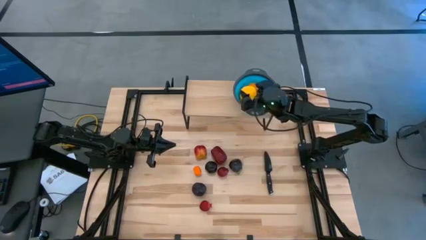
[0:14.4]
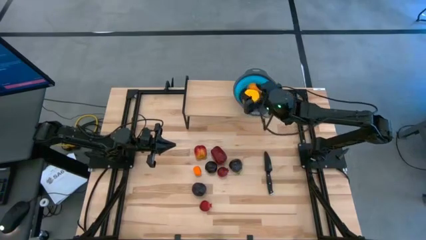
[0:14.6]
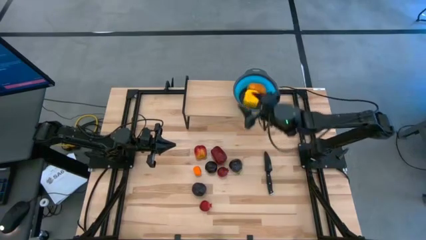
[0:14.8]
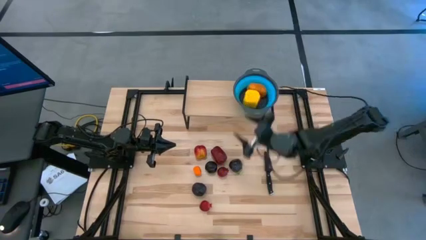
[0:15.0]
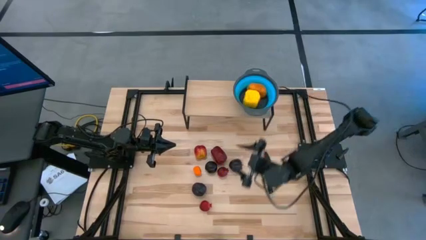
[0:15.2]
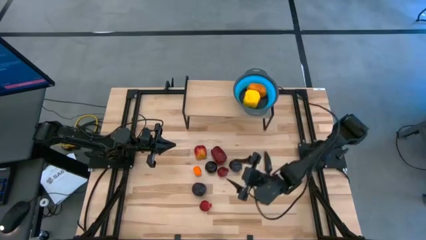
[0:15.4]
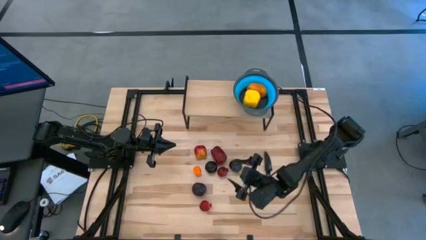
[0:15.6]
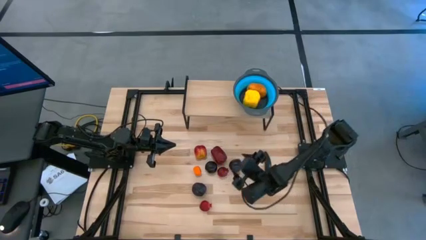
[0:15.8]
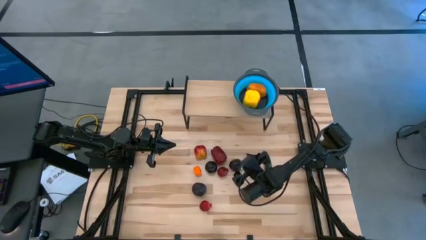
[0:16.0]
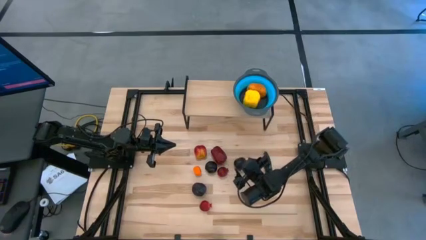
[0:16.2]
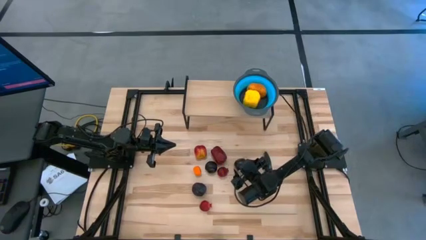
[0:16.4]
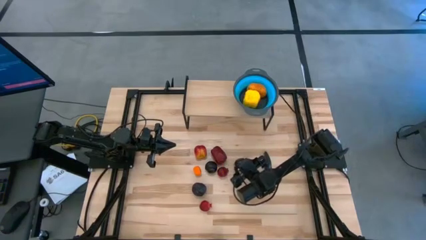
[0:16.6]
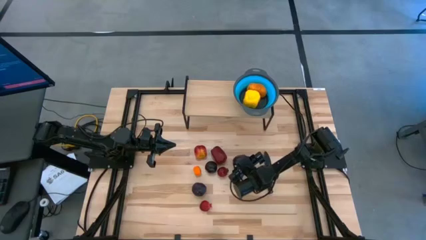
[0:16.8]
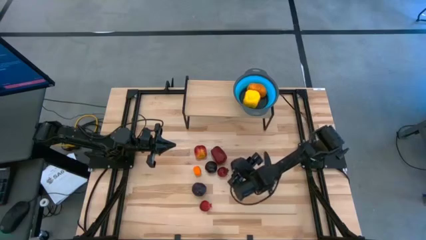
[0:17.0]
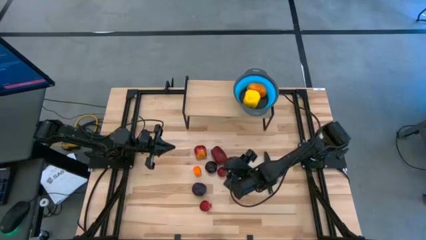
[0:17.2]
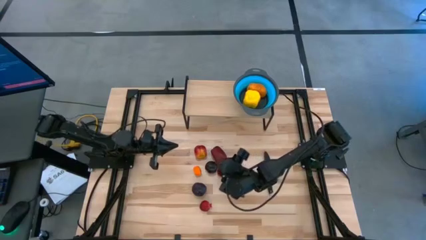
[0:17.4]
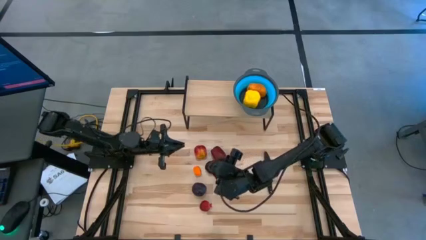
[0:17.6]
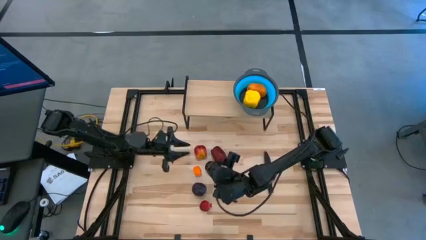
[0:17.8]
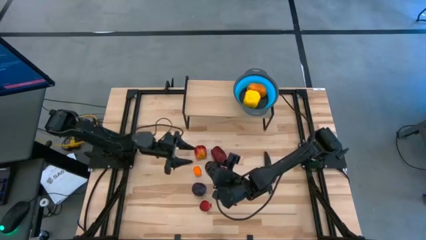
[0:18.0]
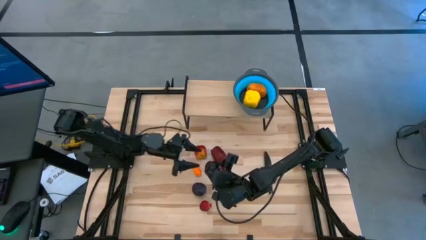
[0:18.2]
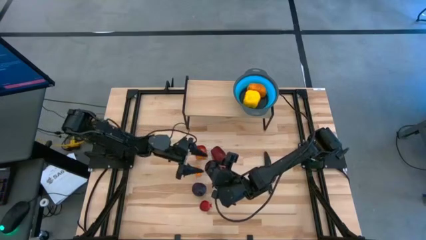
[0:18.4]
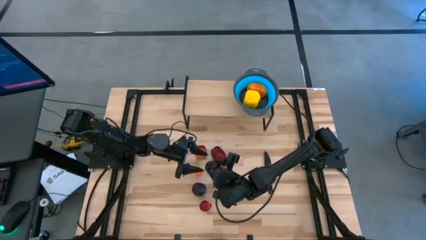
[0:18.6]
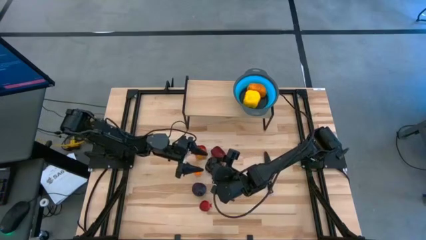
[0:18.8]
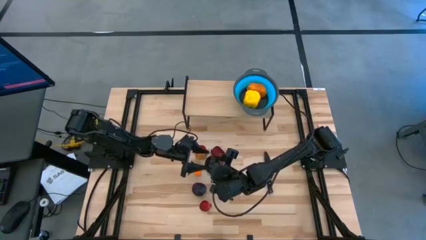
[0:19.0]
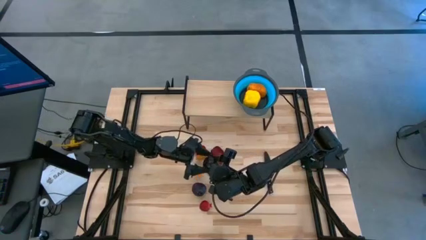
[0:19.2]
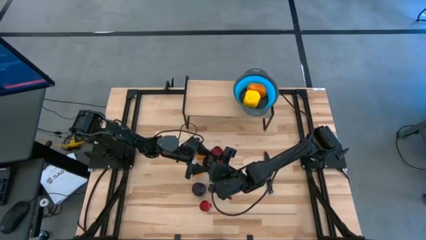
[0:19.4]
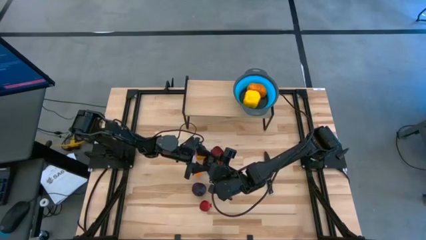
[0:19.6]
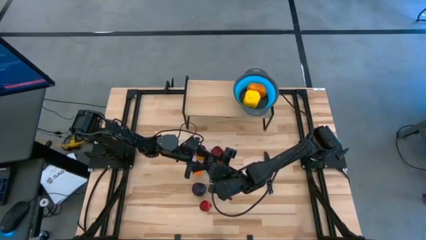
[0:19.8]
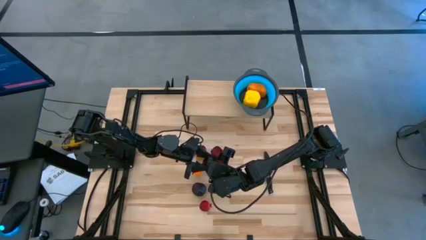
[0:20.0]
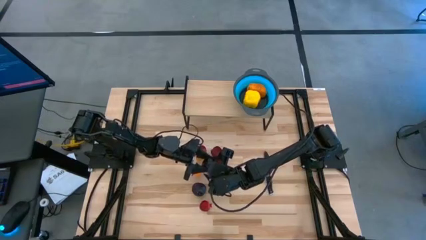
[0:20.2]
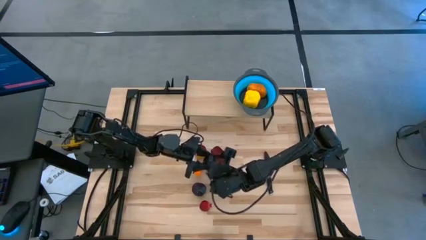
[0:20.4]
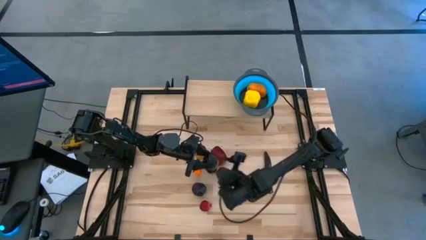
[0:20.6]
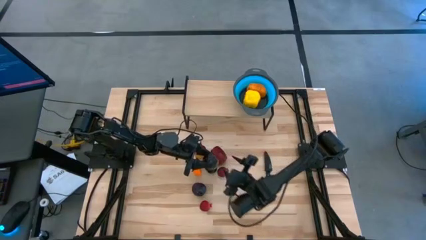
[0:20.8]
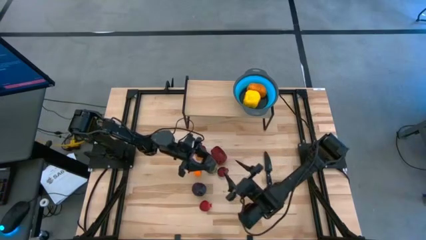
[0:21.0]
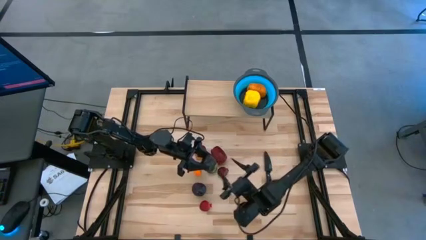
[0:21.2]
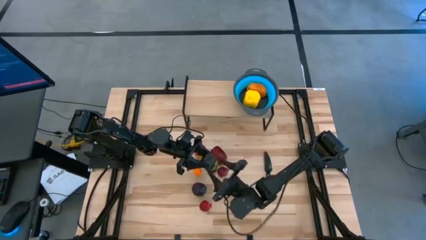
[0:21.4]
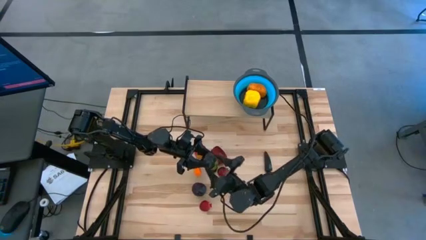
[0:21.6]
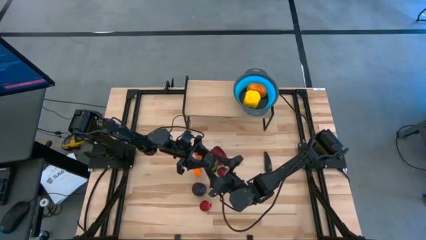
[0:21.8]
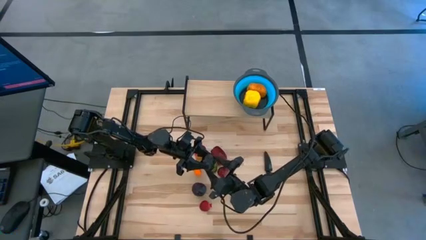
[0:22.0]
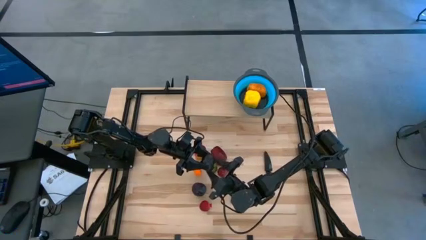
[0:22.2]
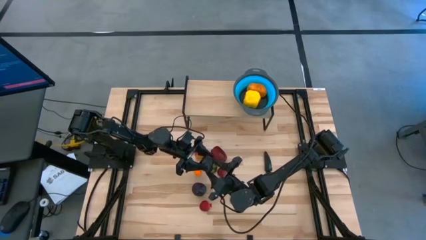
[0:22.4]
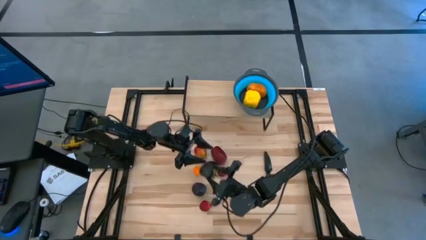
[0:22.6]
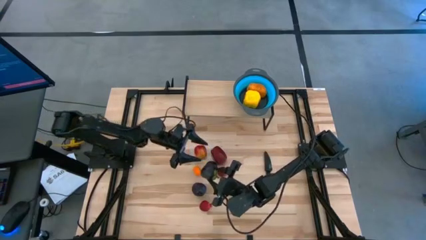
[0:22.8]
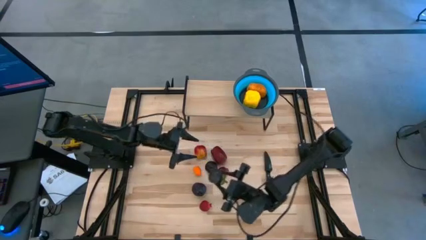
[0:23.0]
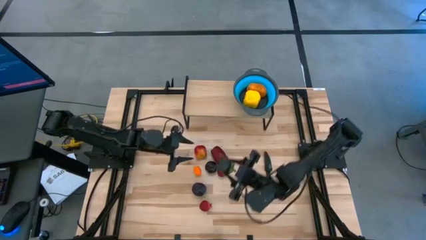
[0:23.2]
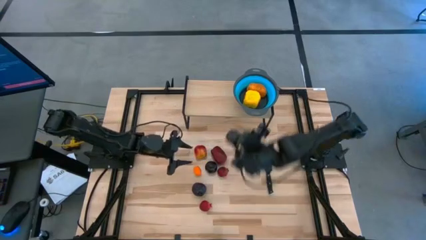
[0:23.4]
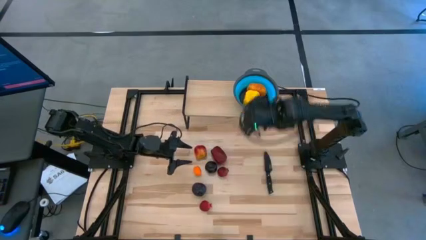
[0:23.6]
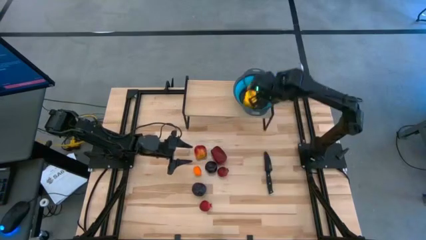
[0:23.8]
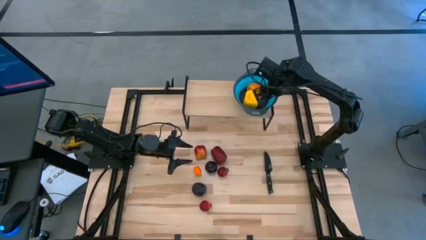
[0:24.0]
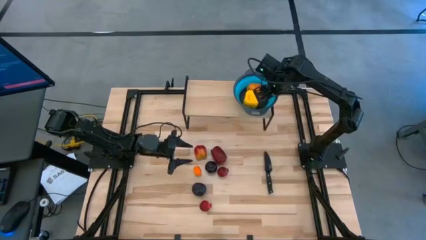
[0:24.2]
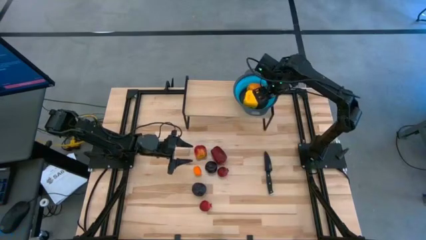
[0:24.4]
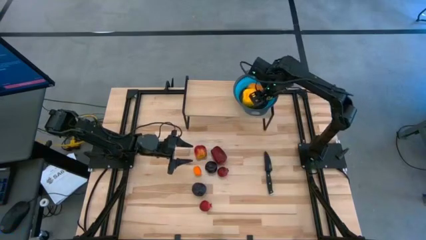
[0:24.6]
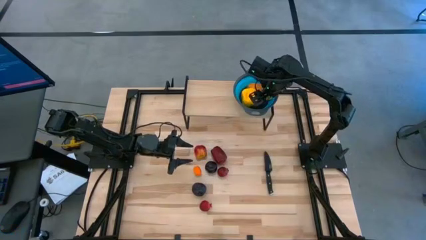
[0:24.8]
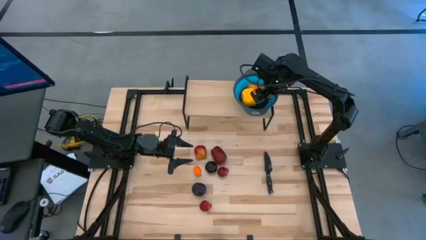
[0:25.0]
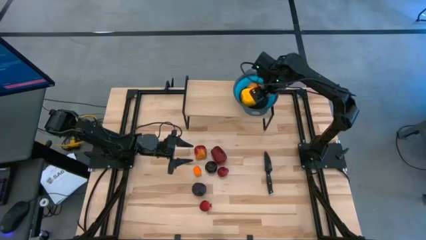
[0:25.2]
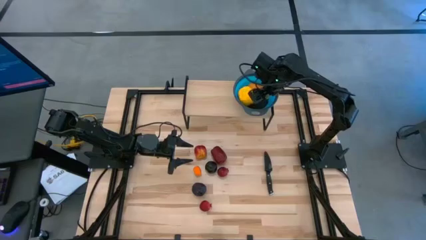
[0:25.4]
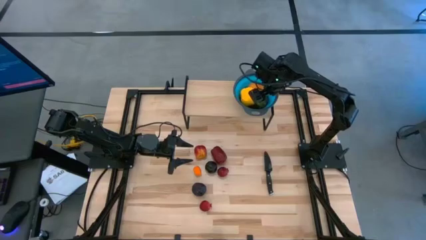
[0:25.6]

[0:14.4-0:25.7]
Task: Pick & Place Fruit
Put the mangosteen into the strainer bowl

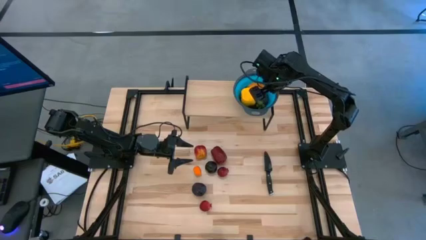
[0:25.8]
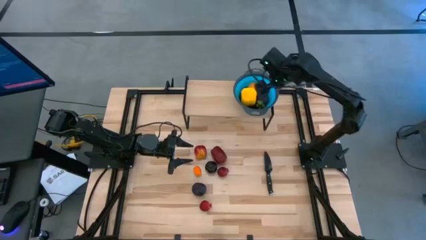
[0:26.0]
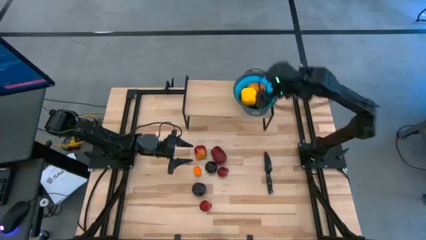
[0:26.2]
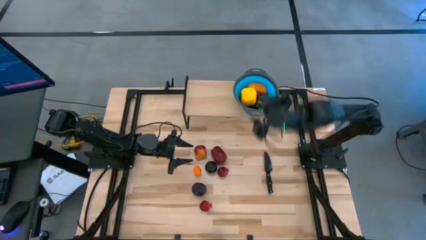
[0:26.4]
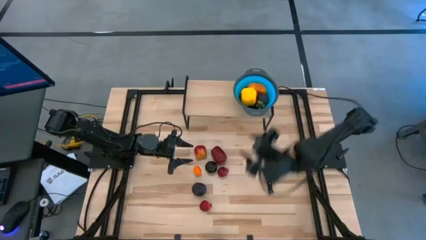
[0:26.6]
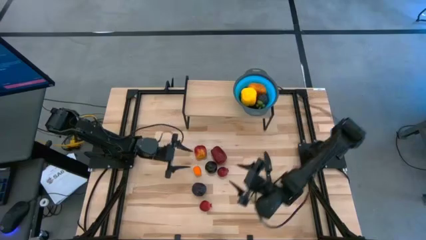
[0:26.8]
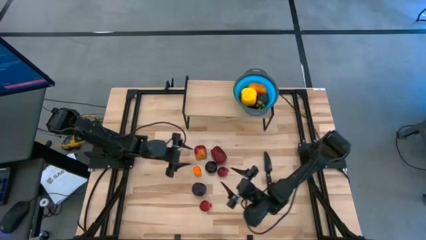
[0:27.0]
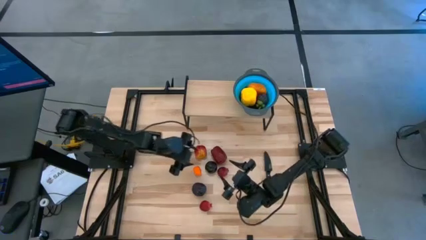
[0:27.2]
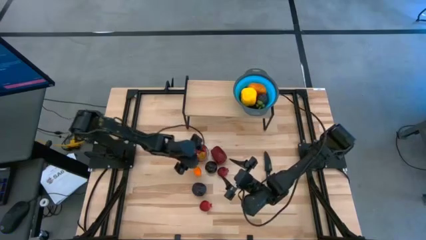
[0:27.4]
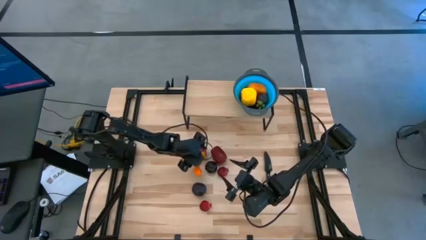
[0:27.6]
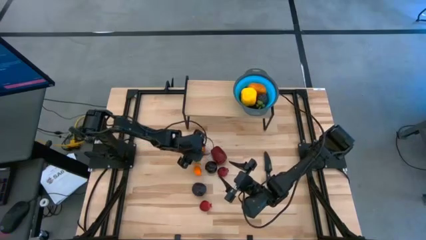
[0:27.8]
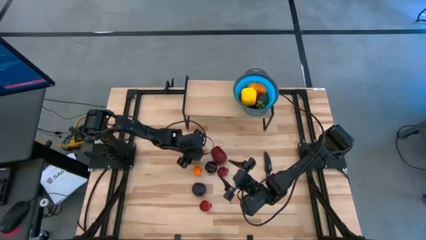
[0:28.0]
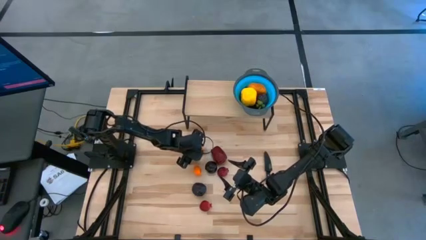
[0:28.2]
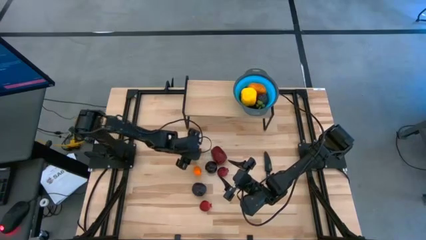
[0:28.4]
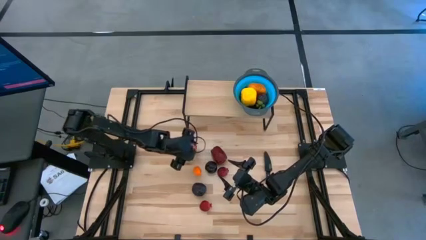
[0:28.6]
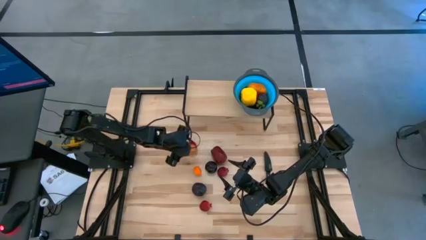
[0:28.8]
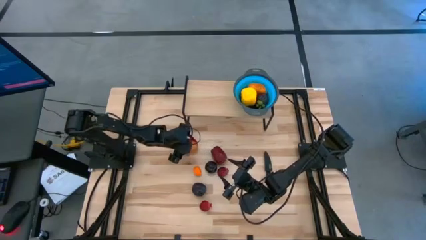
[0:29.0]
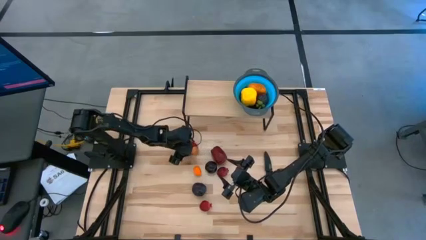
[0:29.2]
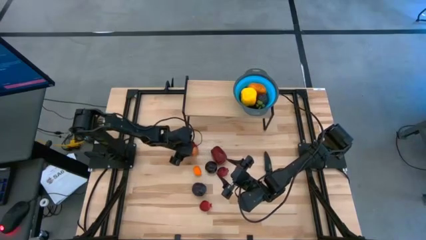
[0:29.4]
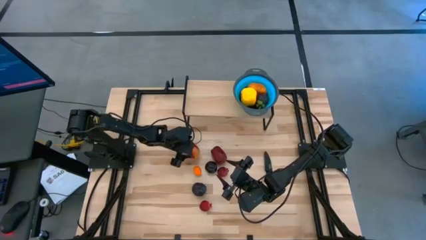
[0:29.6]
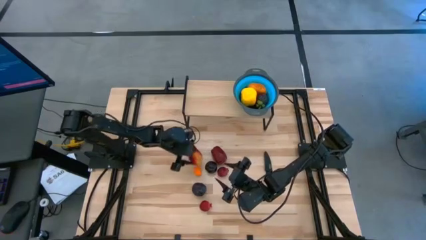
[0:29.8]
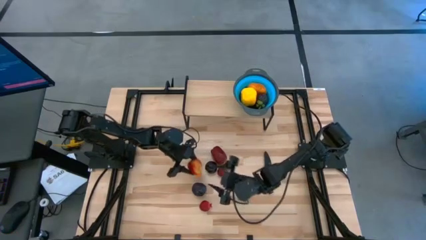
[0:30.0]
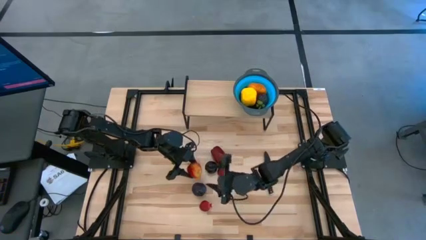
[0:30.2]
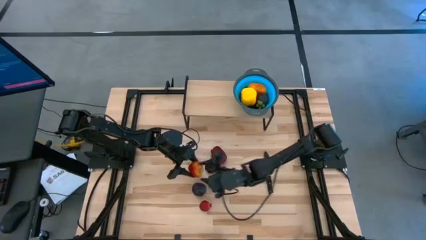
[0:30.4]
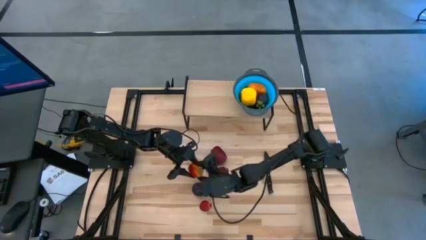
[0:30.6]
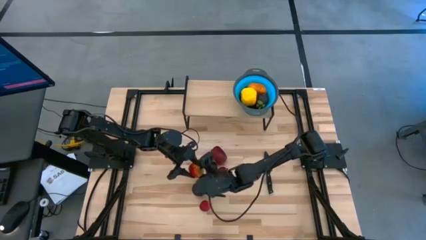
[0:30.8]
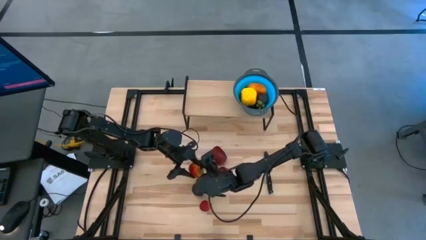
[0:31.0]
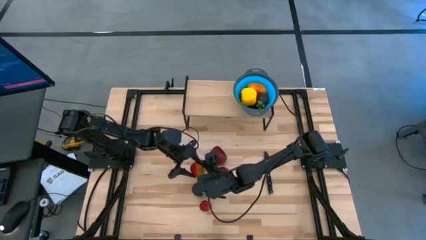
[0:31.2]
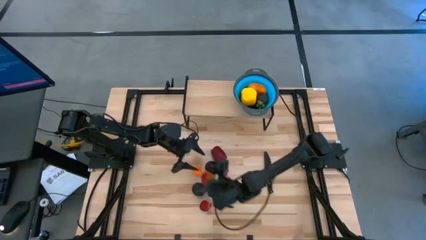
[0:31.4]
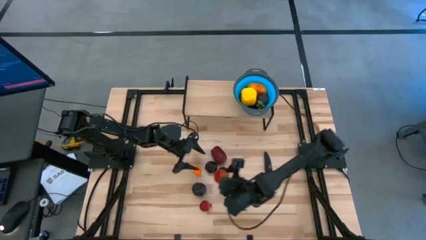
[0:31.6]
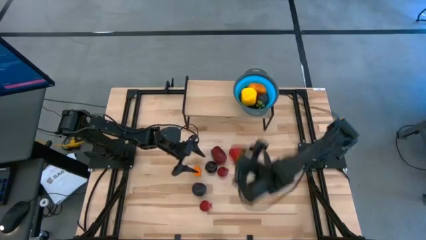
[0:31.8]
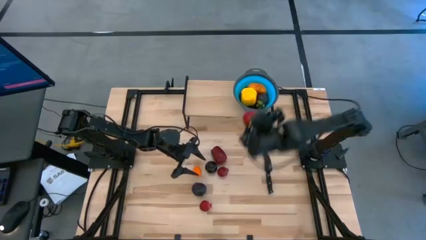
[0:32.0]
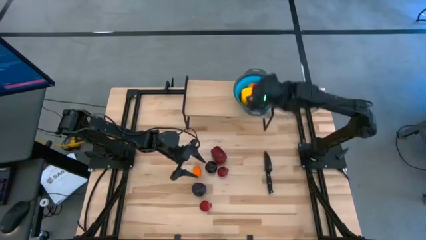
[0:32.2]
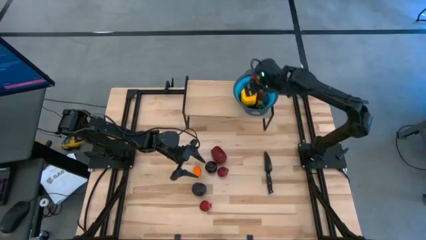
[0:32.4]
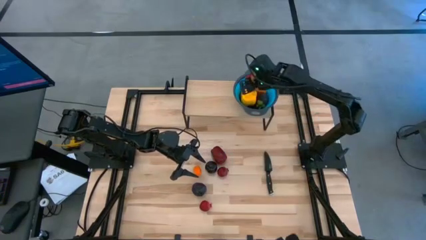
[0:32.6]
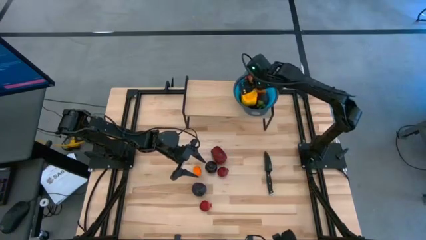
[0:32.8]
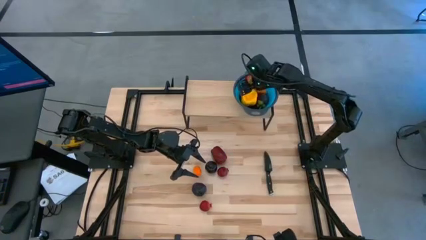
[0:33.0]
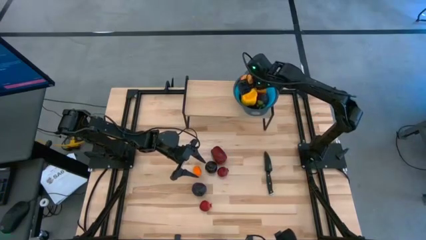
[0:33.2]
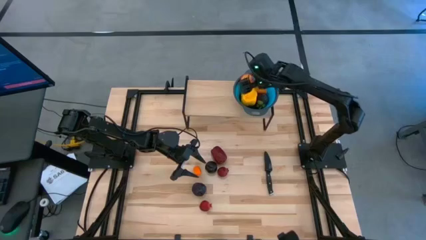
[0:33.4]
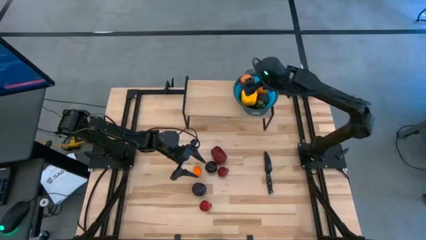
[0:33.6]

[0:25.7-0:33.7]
Put the apple into the strainer bowl
